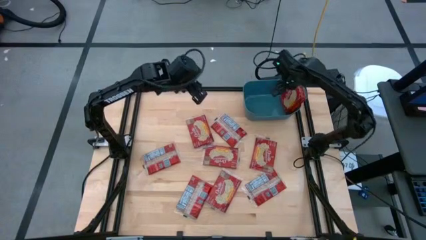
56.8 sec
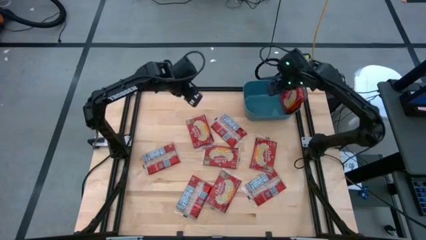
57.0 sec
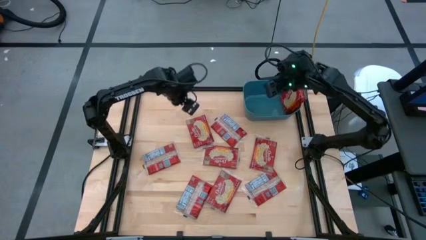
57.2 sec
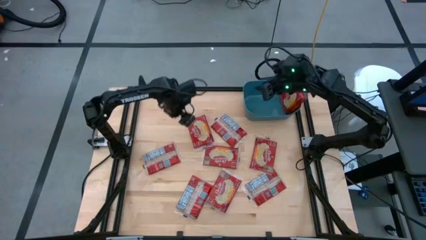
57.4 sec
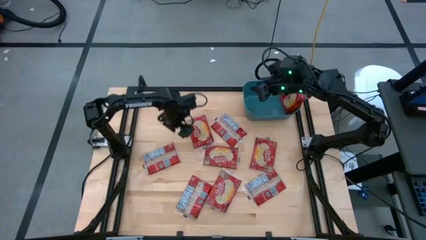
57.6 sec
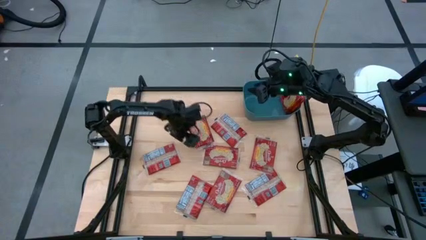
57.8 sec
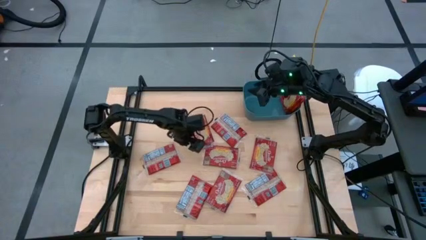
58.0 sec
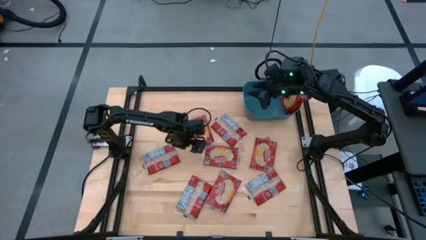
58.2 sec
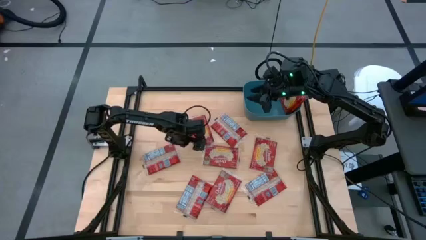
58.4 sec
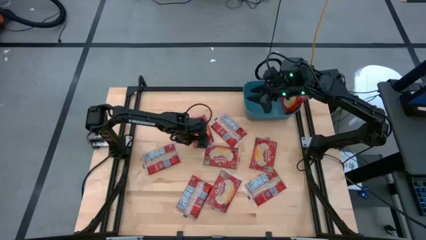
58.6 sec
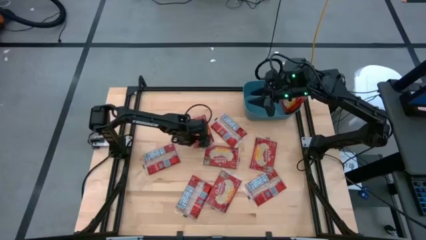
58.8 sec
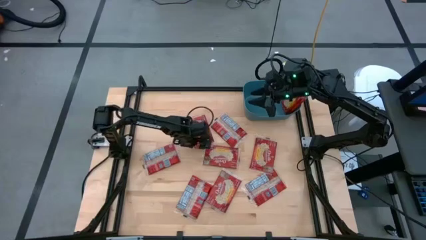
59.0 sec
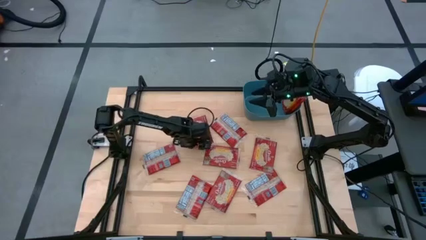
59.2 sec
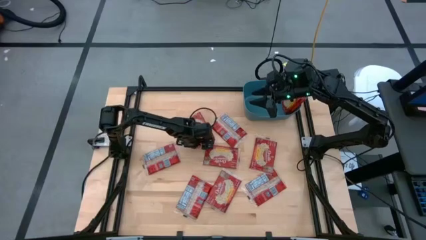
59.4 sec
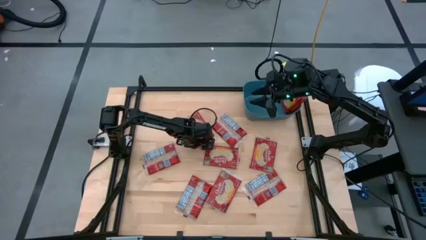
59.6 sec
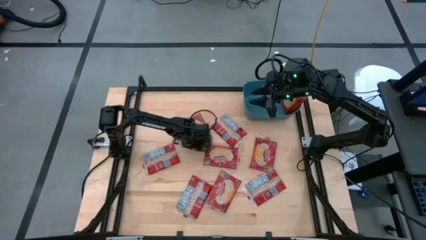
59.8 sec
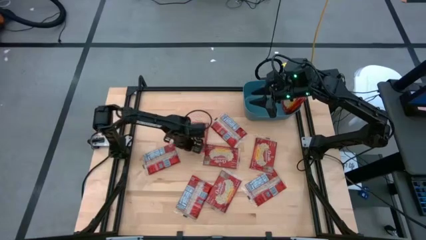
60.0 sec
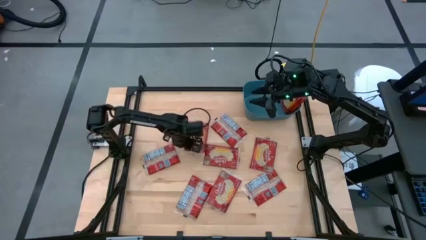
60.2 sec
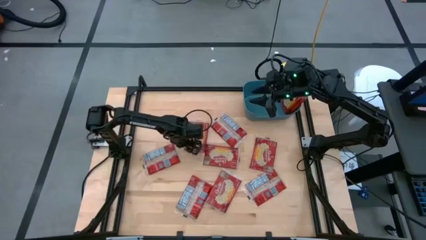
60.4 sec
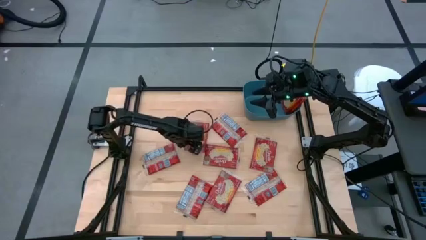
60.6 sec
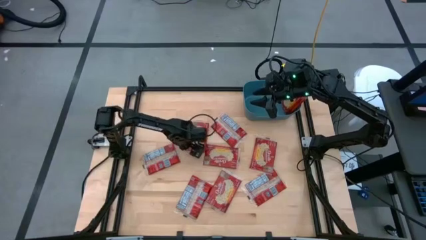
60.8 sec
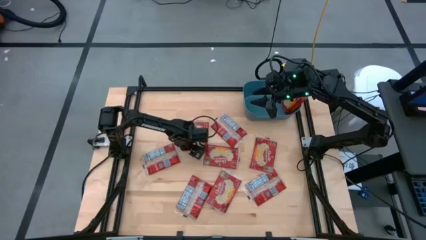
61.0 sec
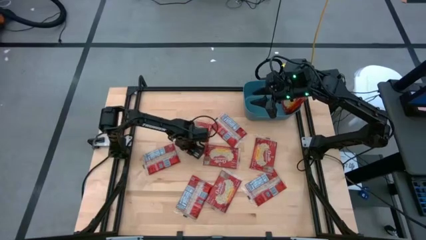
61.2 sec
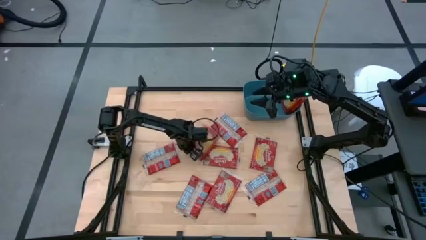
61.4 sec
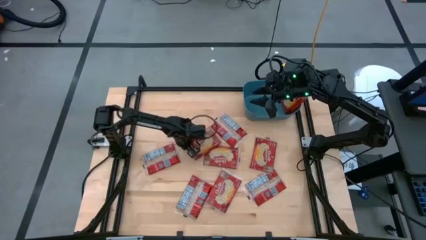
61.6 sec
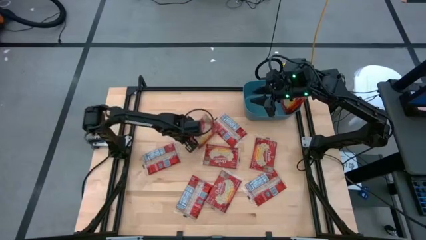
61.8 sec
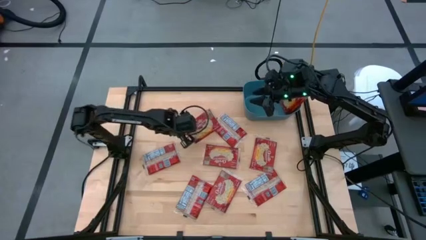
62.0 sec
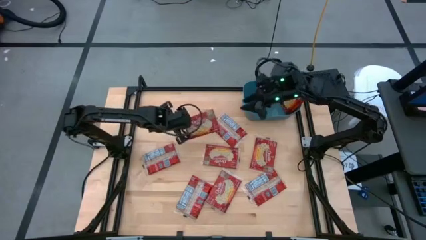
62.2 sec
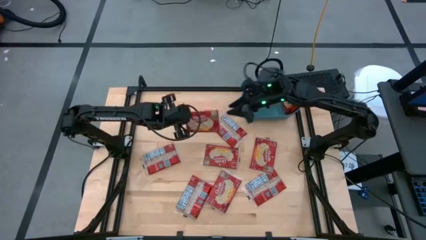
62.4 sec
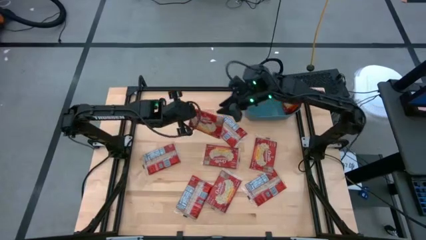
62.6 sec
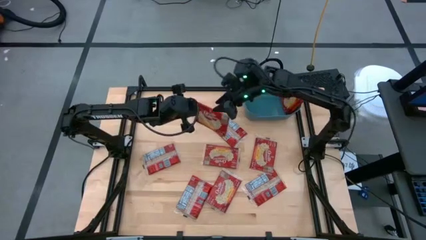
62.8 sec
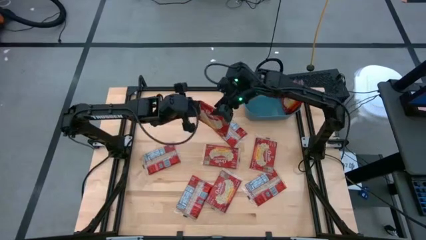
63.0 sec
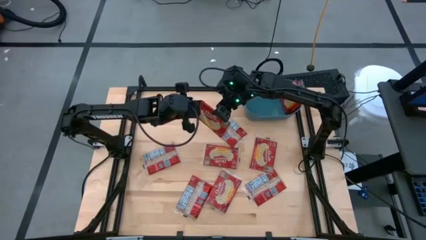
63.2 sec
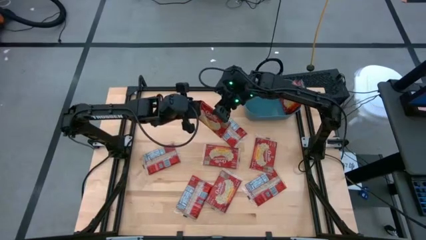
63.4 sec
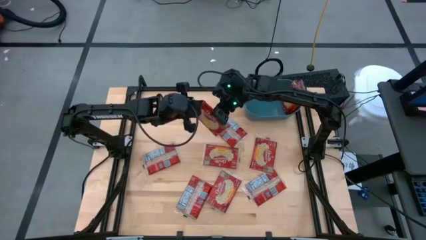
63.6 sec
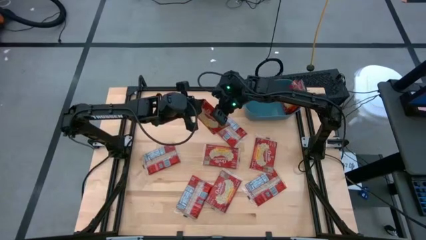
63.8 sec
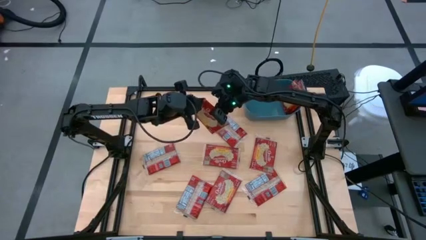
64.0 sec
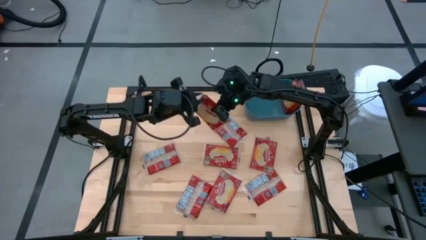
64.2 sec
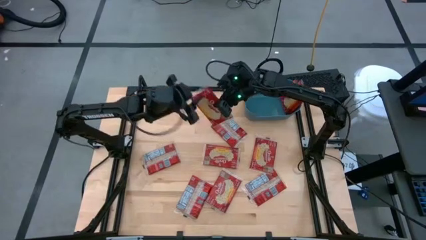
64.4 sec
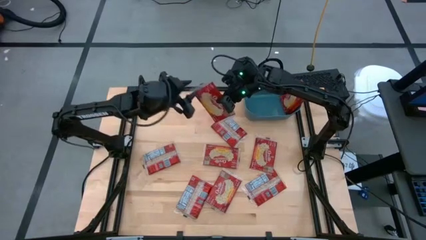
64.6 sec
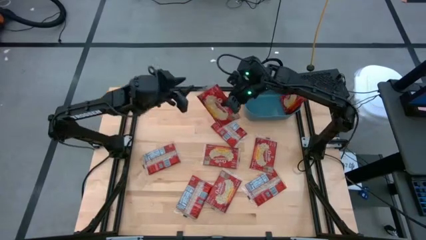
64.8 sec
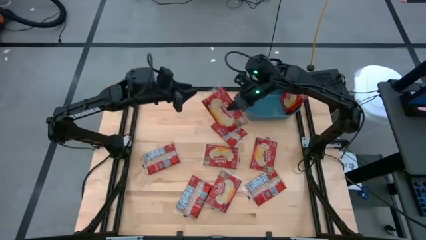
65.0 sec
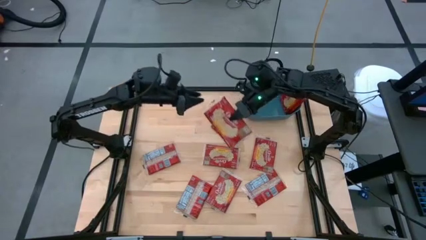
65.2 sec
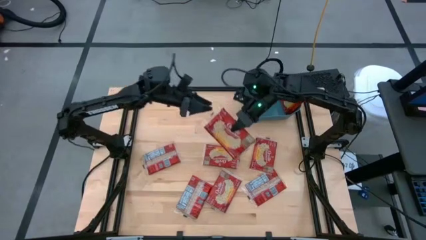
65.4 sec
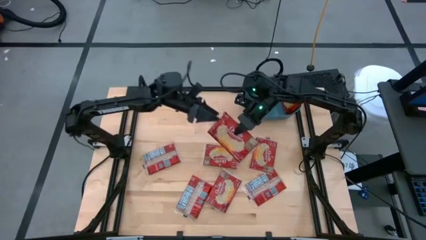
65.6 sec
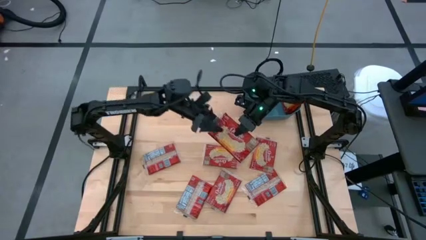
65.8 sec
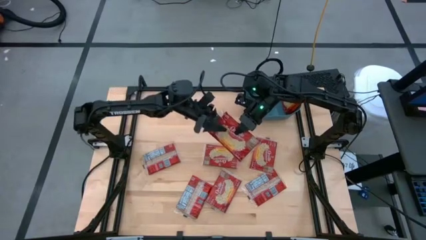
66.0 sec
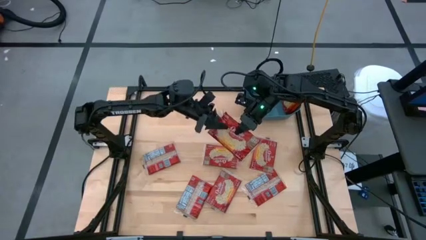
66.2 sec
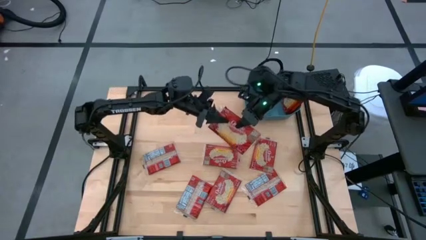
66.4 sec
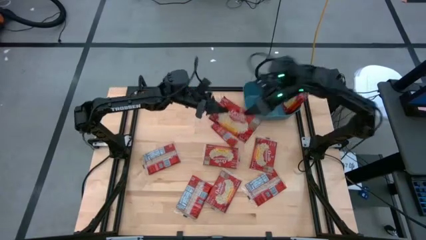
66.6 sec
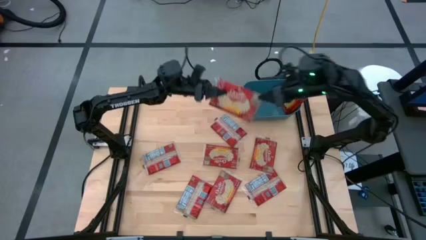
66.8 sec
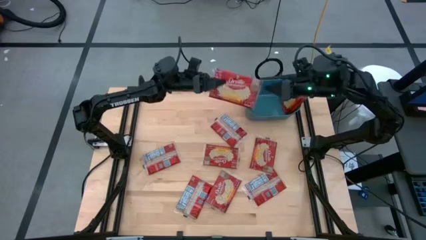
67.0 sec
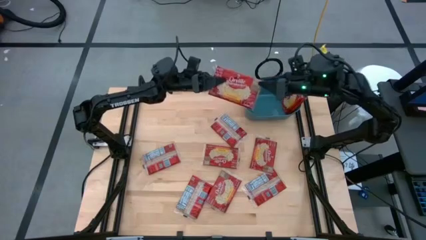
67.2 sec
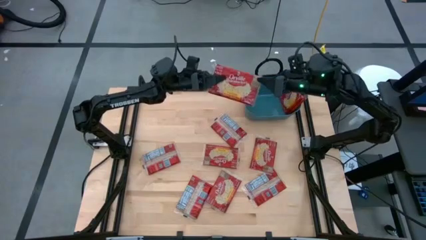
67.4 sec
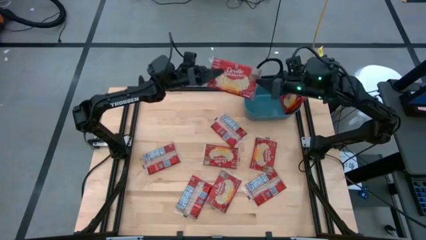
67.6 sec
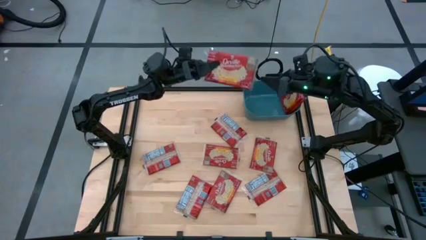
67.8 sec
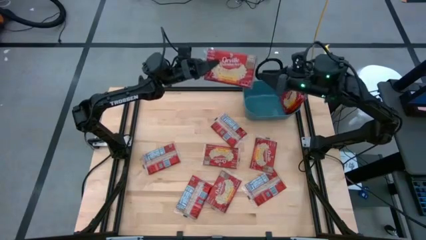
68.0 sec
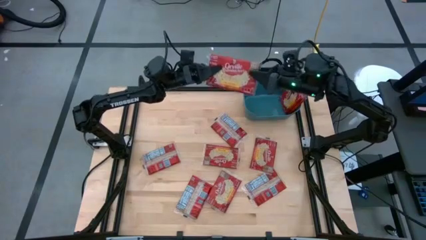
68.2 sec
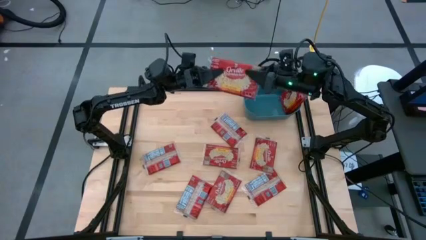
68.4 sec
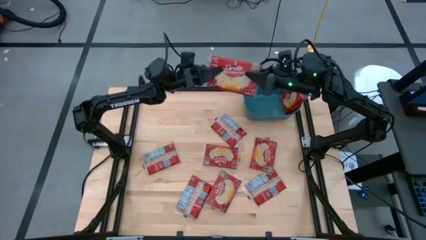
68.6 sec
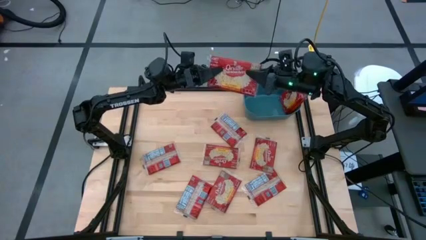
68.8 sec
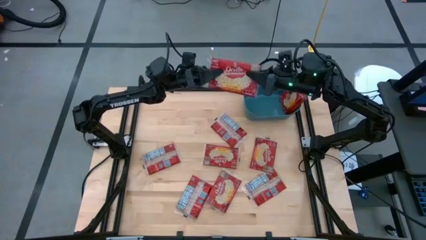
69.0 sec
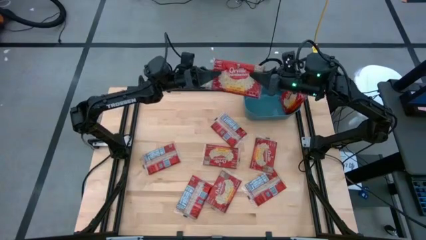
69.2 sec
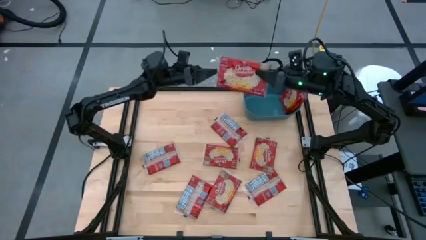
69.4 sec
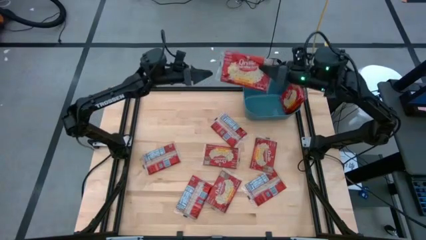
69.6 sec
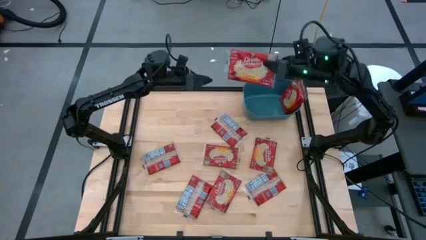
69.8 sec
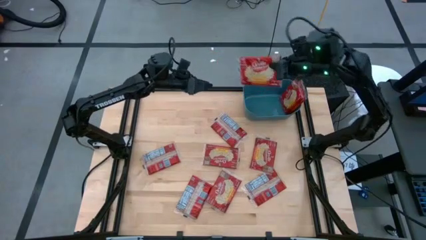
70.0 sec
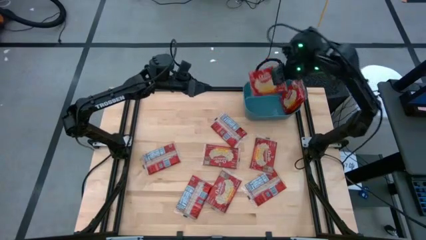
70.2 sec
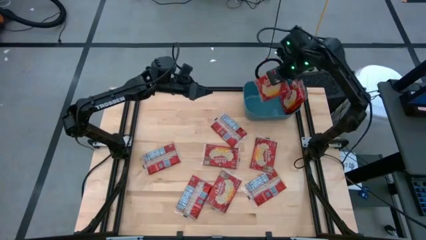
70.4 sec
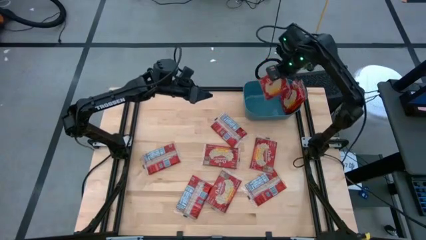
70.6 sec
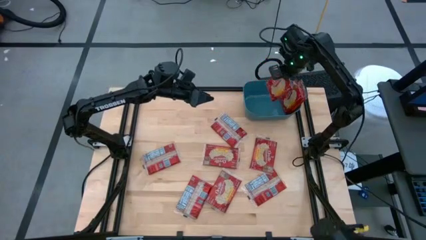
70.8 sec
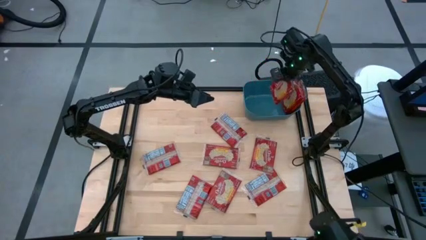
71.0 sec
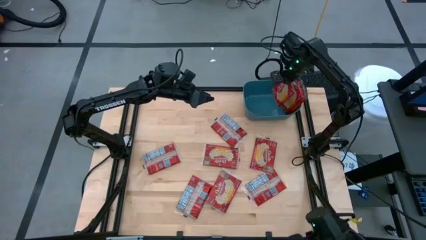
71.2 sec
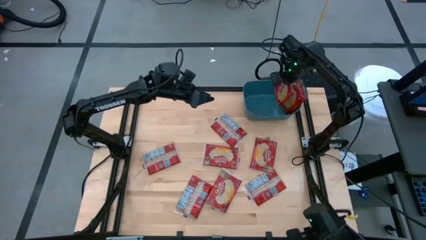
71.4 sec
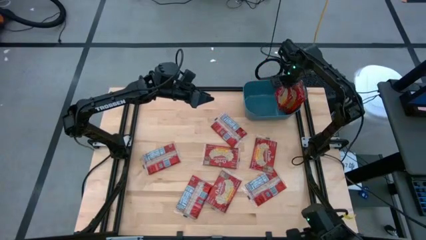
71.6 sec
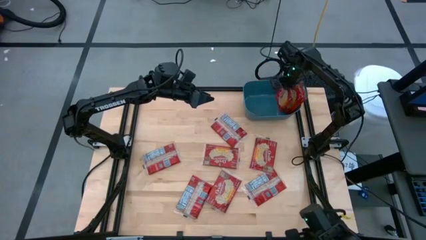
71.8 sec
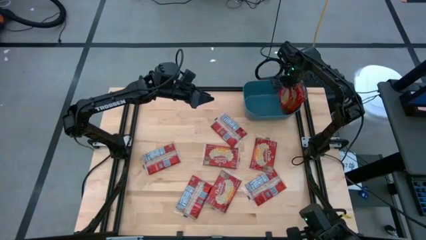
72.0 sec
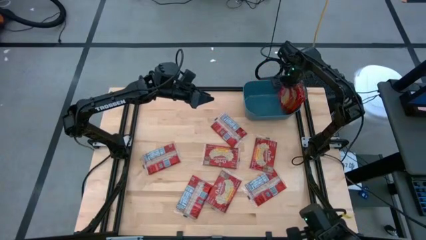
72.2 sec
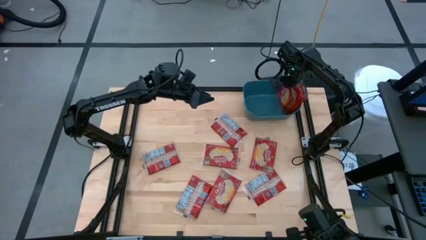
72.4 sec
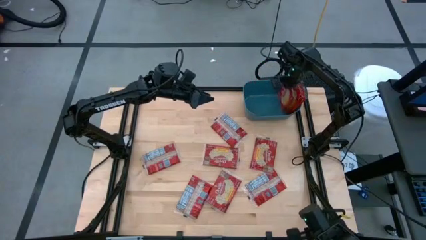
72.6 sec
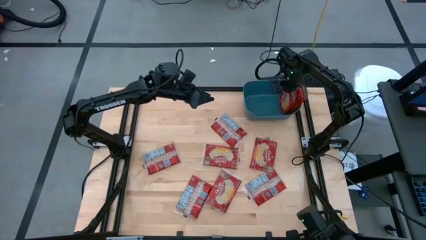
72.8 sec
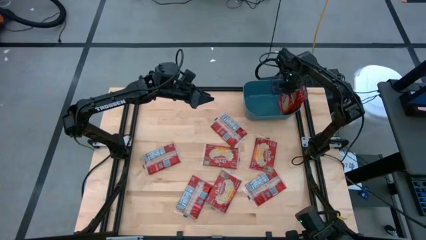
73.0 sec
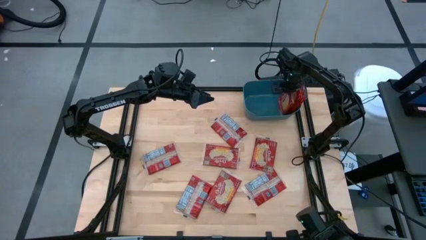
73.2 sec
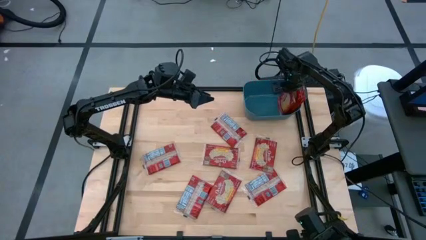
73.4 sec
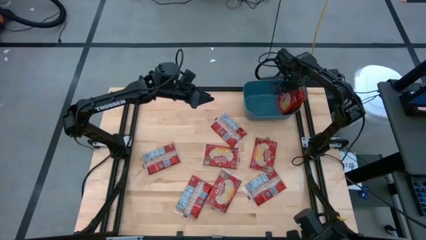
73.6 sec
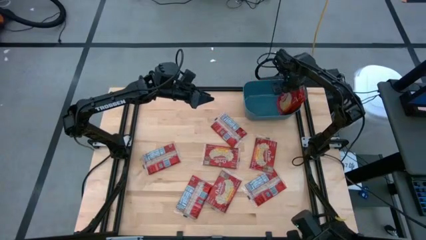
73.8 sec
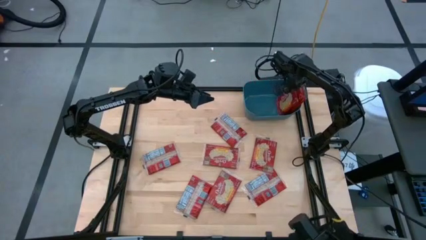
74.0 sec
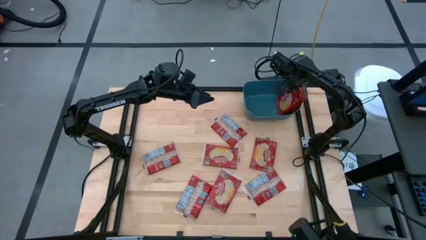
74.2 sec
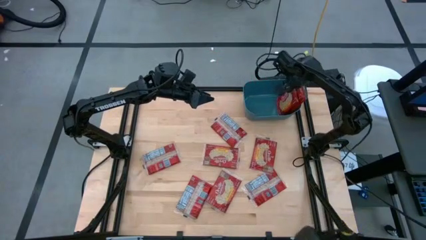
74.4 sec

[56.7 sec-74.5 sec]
Task: Sort popcorn bags into baskets
Put the popcorn bag into the blue bin
